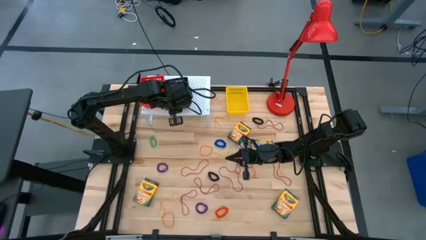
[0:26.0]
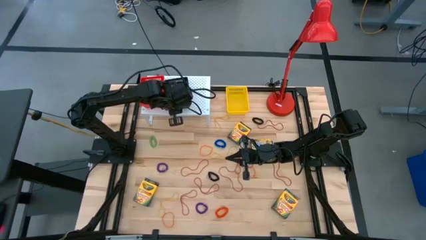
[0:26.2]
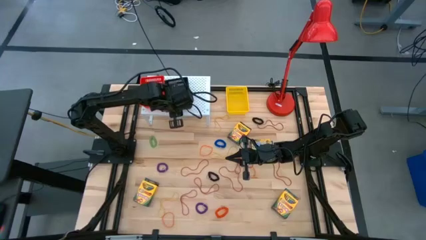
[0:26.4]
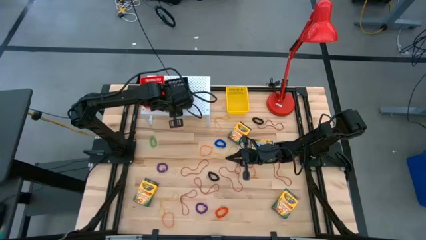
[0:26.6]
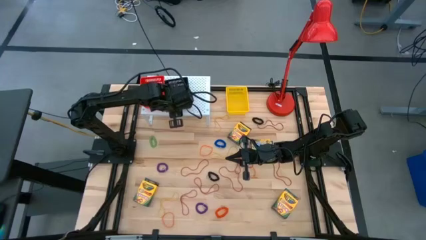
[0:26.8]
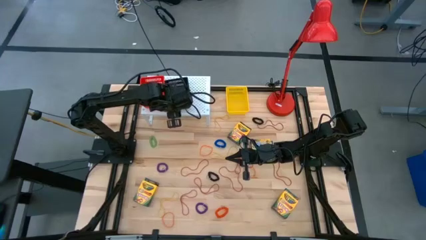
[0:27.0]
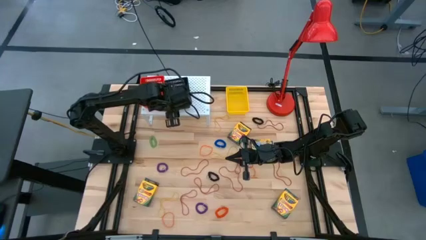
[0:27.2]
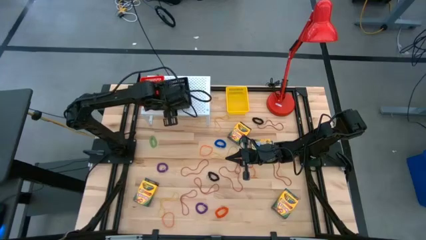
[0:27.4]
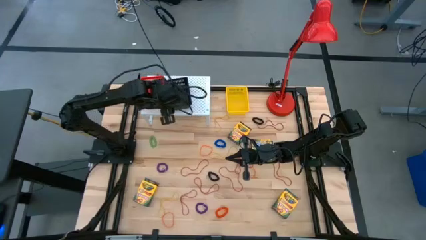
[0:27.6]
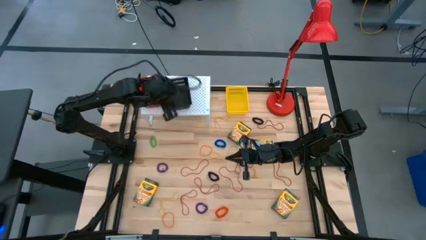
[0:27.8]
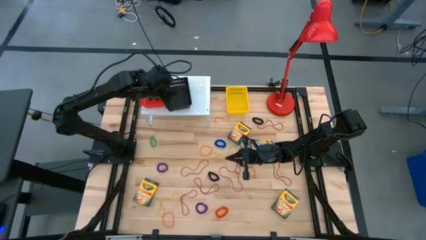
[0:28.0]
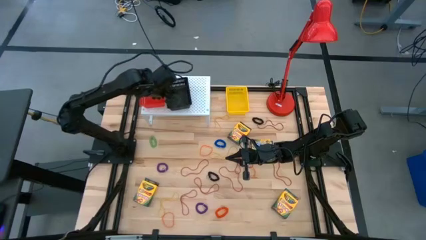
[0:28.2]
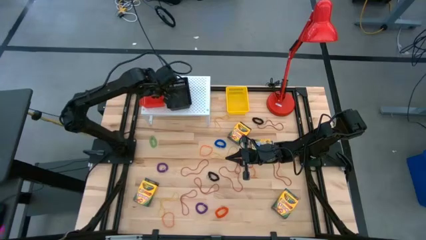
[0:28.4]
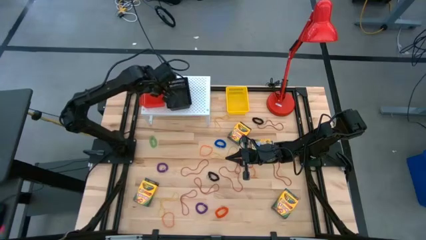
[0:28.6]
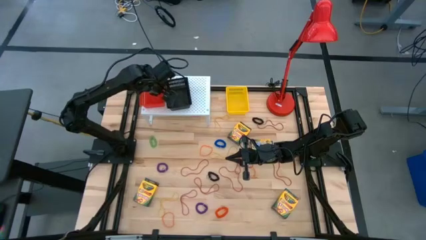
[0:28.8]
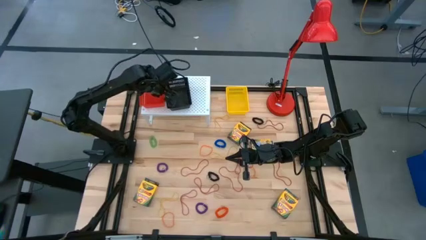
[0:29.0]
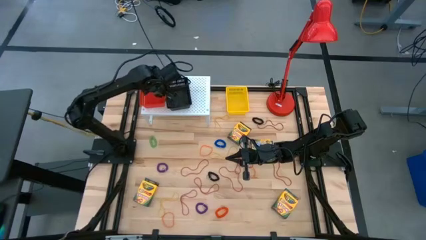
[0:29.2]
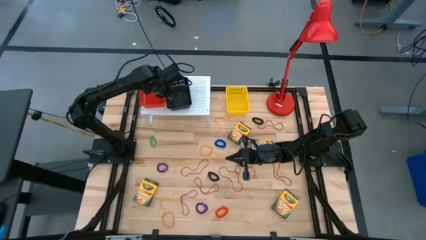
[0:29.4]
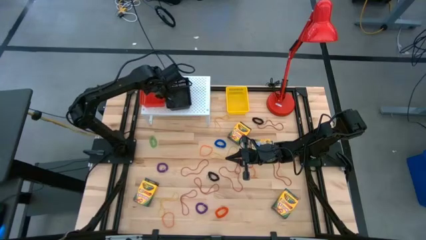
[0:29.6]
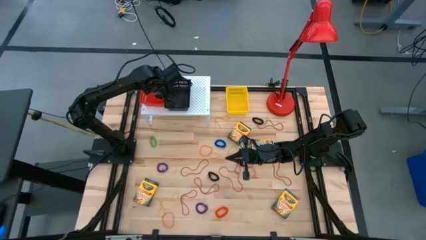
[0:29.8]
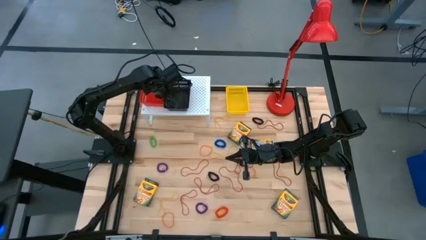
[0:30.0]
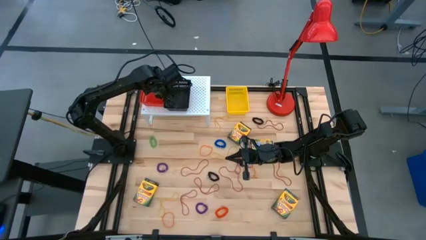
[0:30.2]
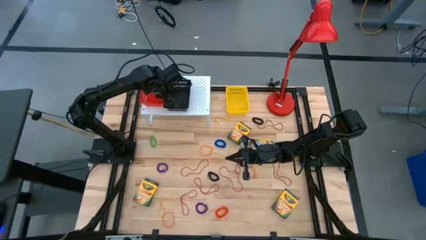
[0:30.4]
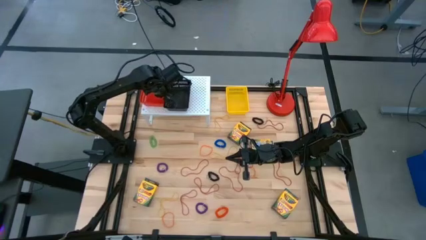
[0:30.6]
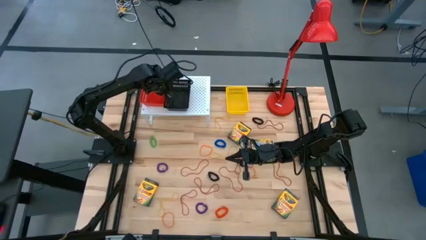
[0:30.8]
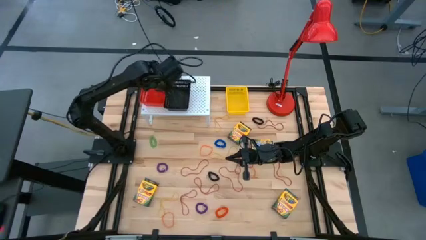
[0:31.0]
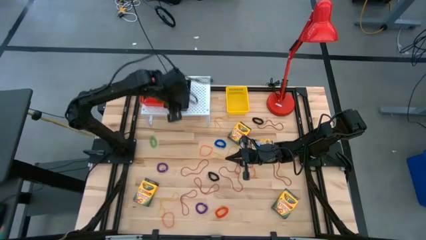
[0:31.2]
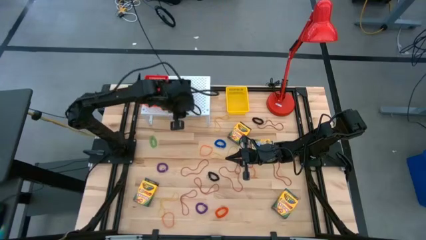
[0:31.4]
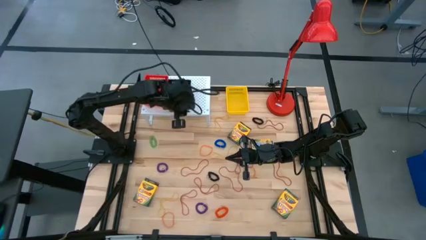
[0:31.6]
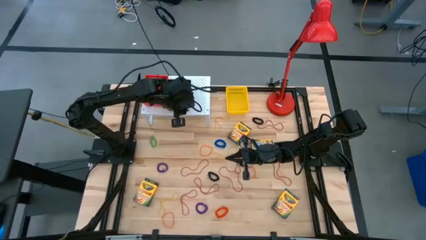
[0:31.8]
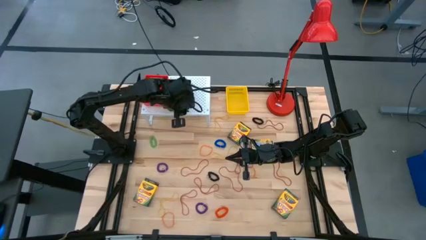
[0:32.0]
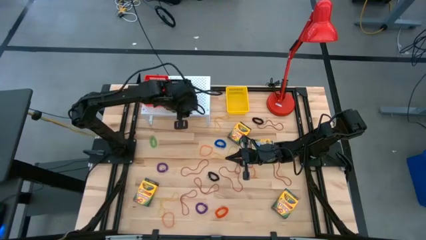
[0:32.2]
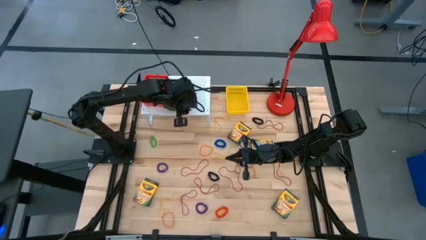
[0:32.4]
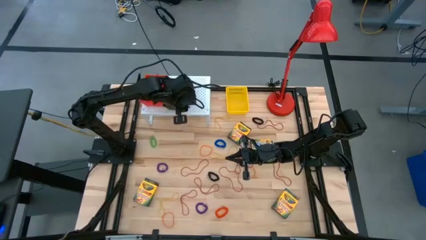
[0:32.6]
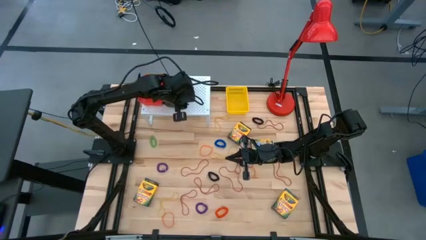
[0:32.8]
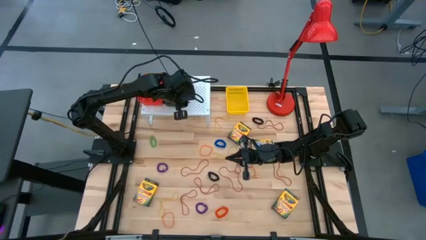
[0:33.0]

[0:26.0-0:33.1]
Task: Pick & Place Office Desk Supplies
Adjust the bins on the shelf

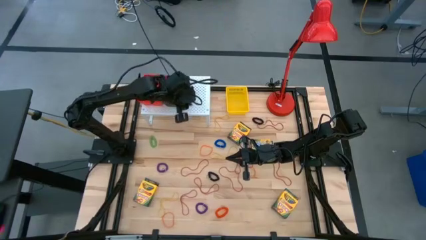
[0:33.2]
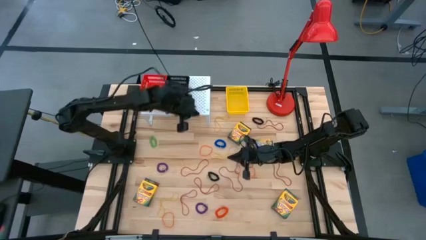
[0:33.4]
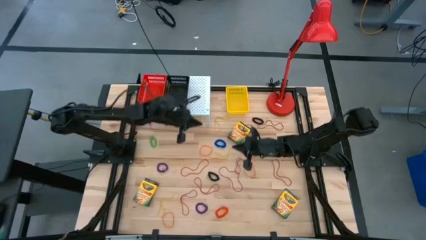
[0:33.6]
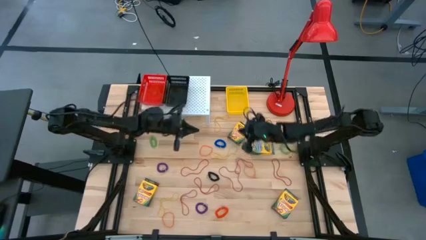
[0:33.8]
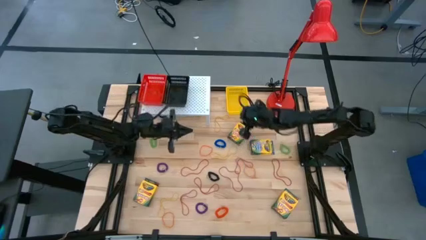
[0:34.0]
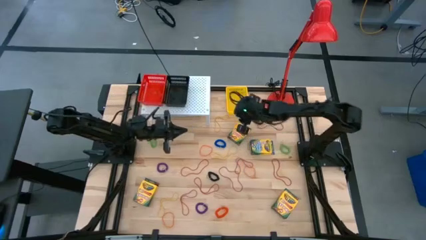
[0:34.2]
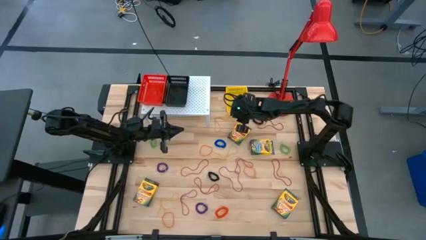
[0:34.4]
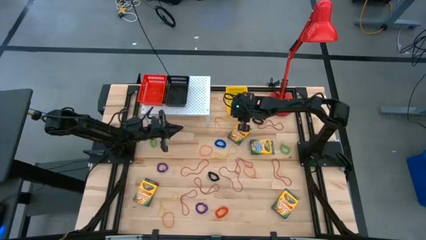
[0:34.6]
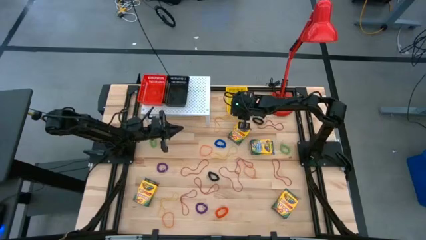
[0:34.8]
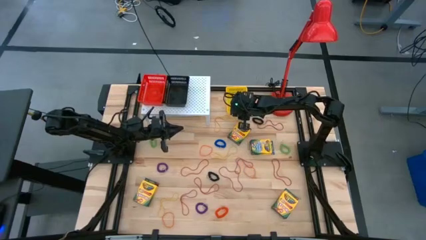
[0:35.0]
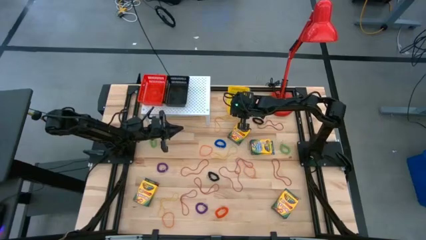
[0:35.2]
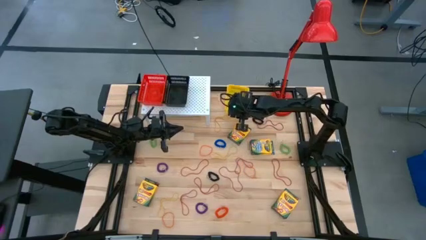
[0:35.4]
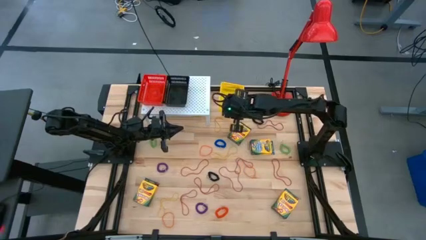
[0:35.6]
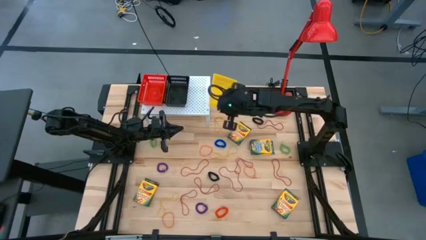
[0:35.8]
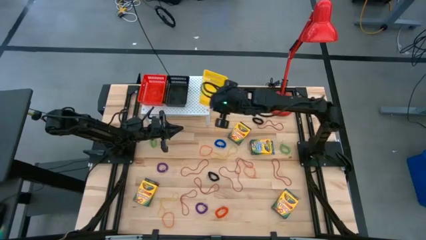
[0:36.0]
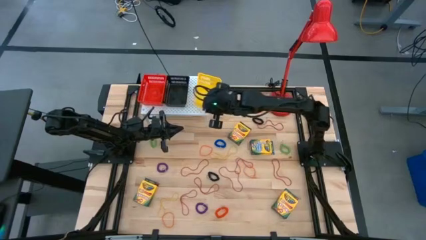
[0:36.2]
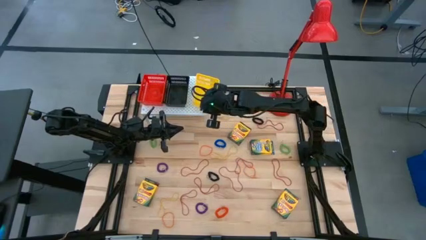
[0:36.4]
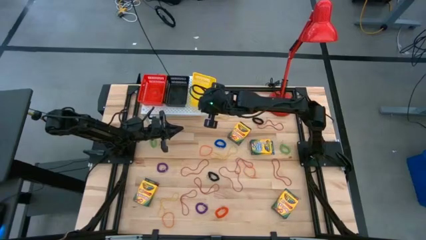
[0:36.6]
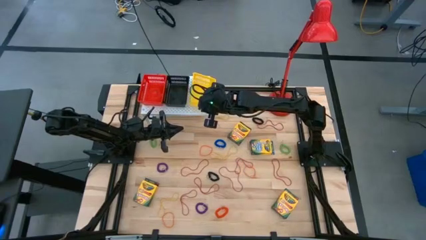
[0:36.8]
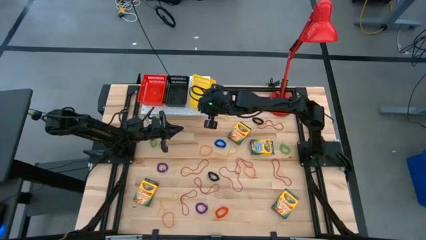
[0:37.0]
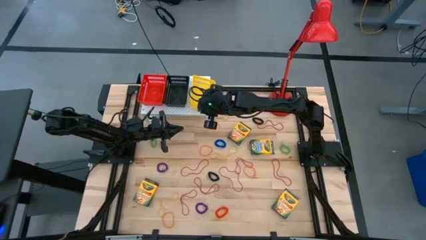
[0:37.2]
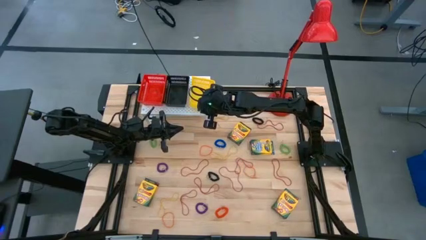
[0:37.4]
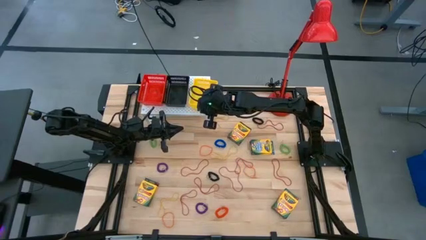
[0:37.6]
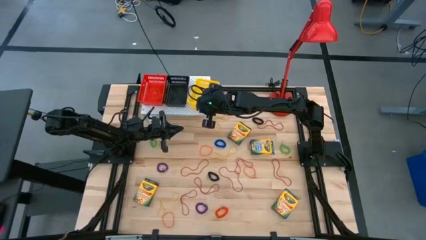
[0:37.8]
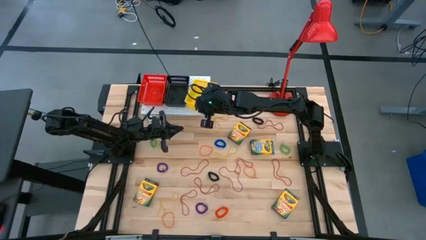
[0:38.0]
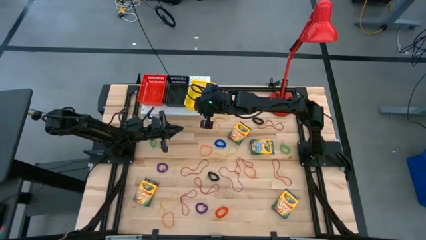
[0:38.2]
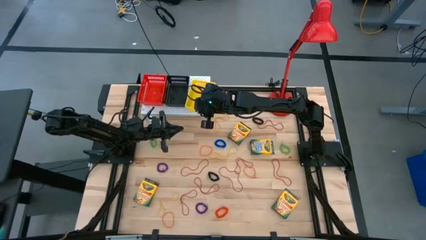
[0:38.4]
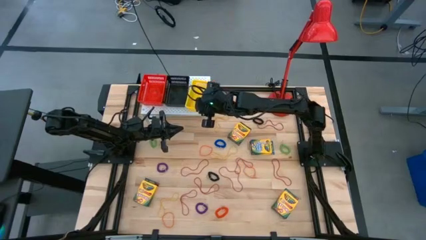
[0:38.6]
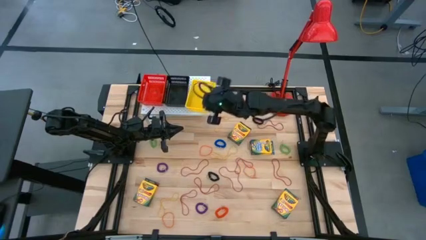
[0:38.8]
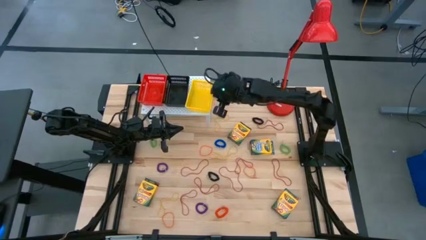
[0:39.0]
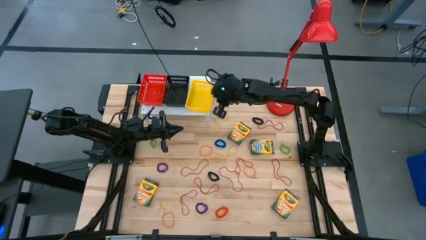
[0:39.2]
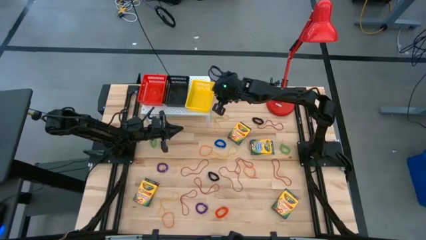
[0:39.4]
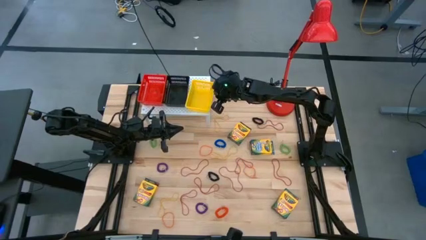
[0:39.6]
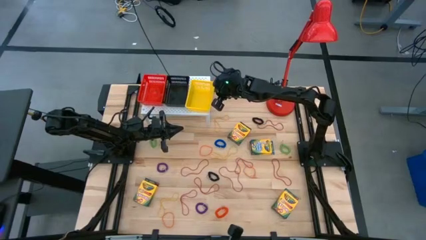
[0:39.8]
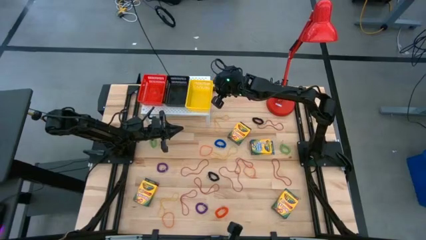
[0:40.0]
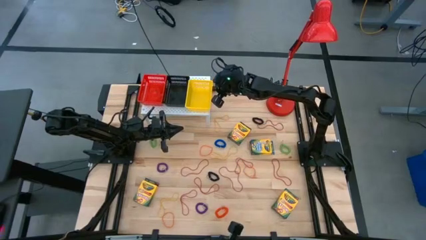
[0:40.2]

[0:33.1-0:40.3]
Put the yellow bin on the shelf

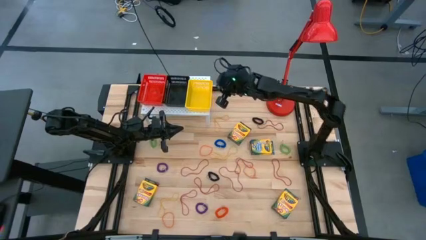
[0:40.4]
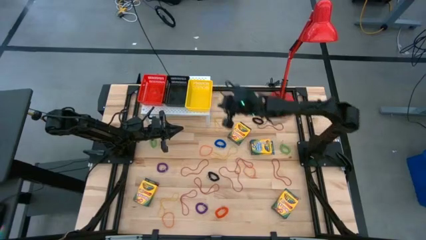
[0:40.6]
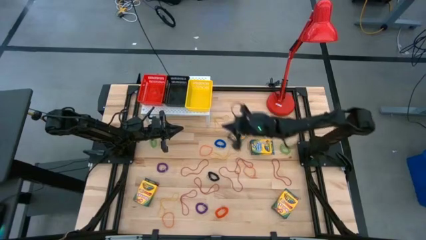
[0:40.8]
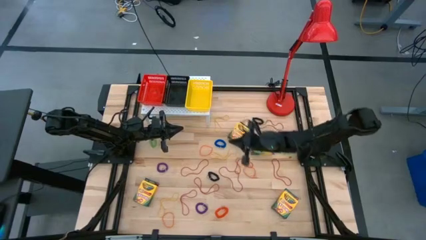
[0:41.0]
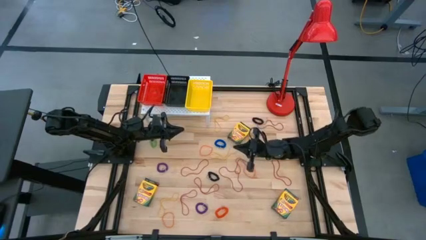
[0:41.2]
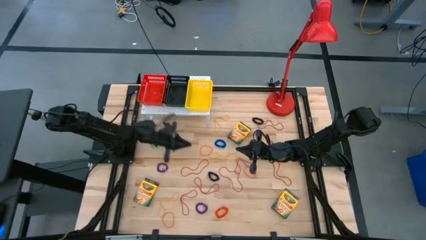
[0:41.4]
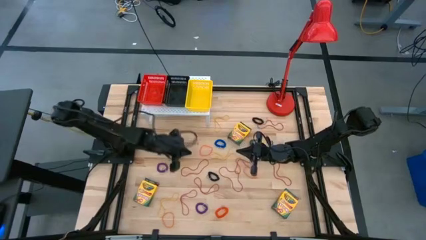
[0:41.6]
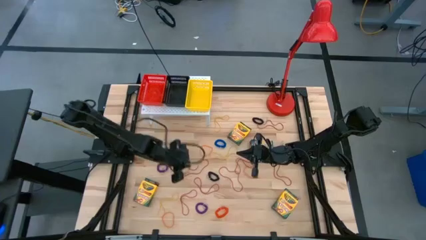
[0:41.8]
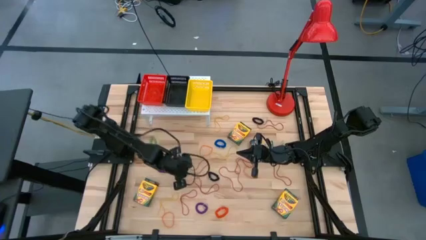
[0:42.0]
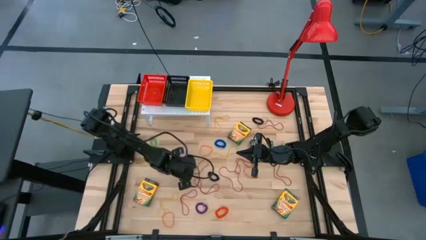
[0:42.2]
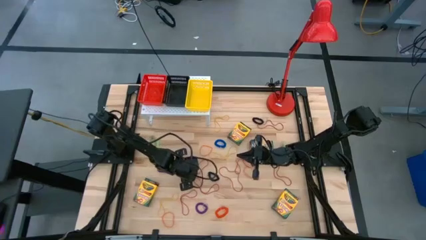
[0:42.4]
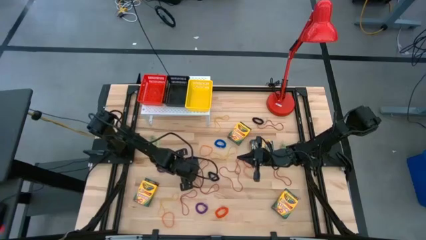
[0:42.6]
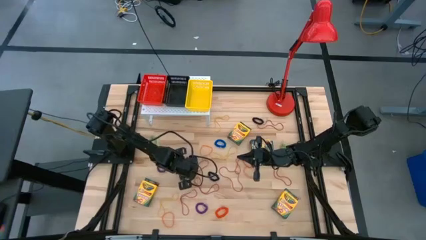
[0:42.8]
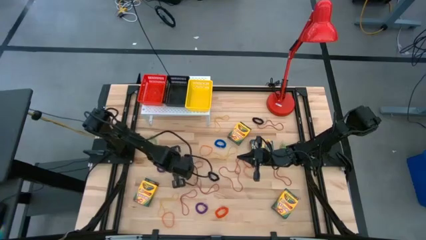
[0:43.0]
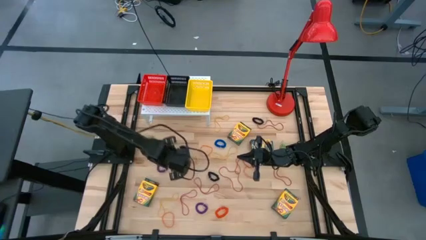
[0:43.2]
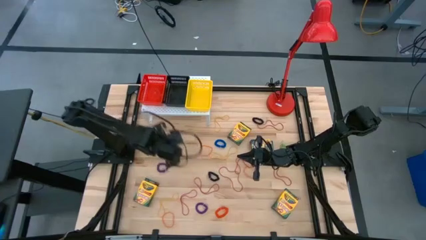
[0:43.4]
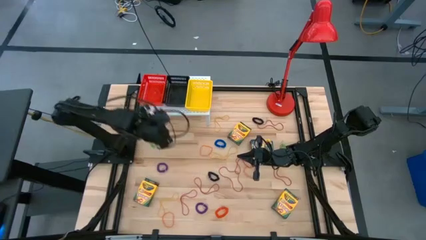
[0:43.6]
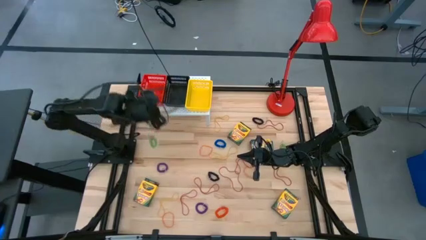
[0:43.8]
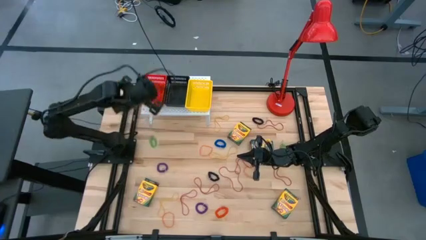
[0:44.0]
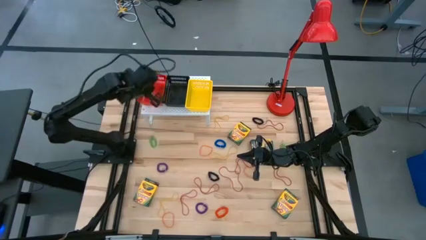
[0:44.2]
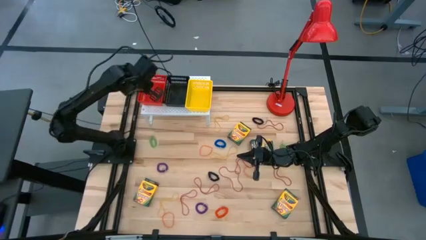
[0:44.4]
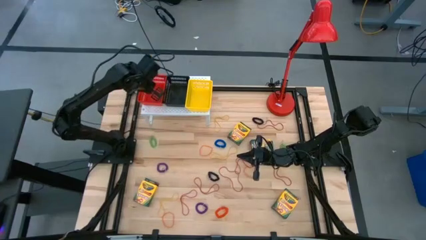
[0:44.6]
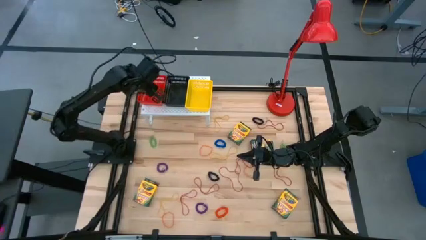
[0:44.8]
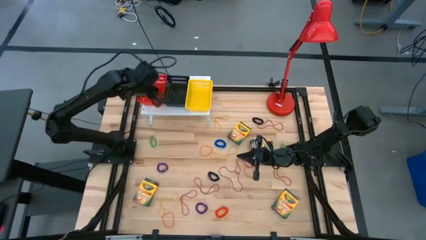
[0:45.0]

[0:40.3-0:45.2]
Put the red rubber band into the red bin on the shelf
